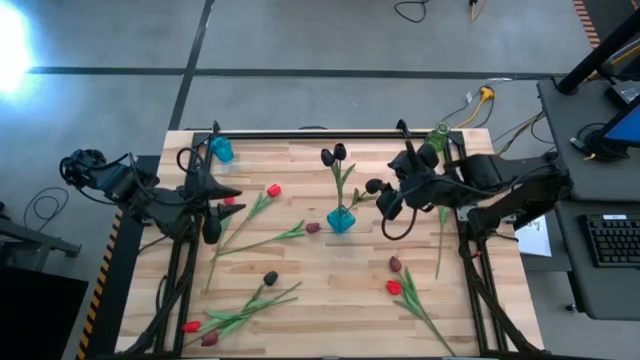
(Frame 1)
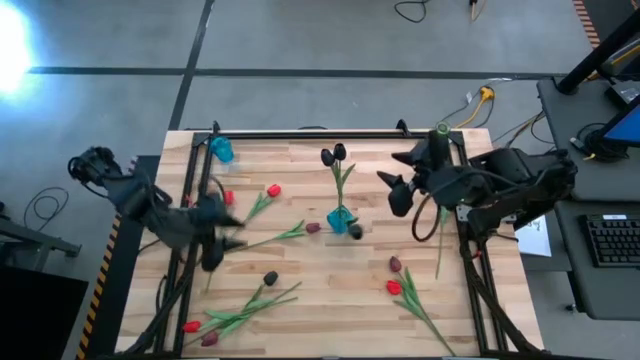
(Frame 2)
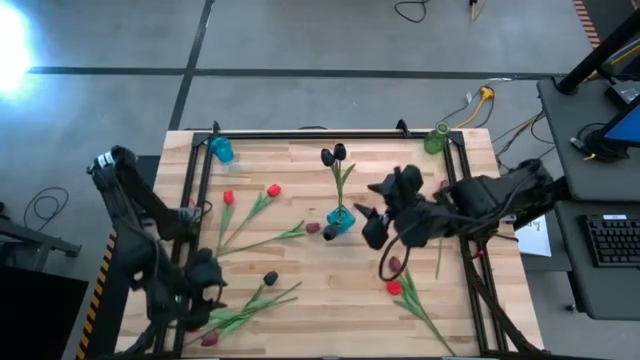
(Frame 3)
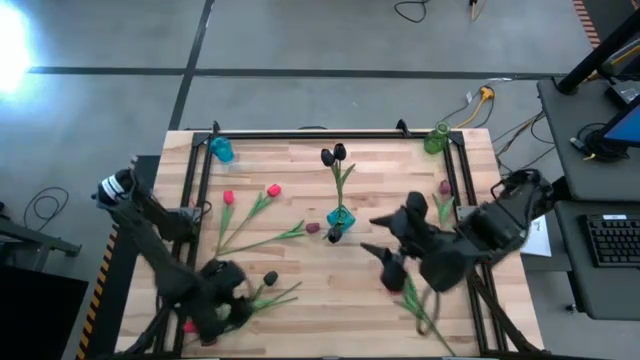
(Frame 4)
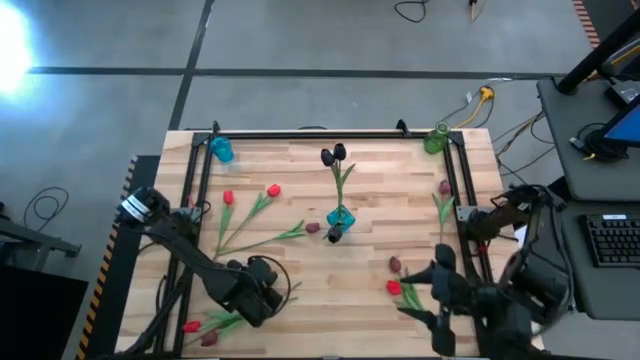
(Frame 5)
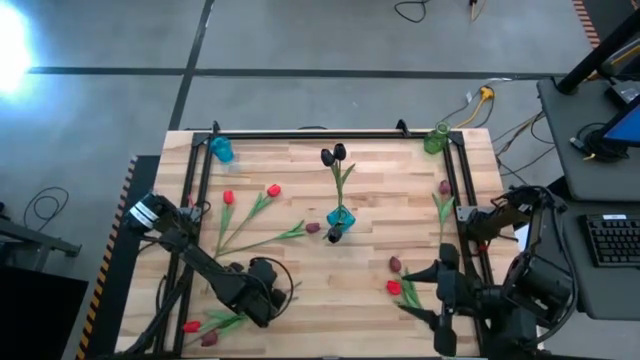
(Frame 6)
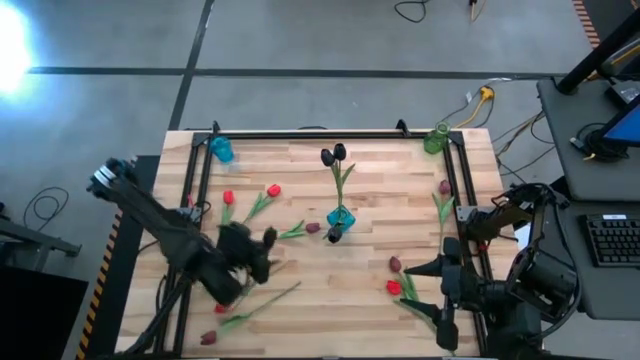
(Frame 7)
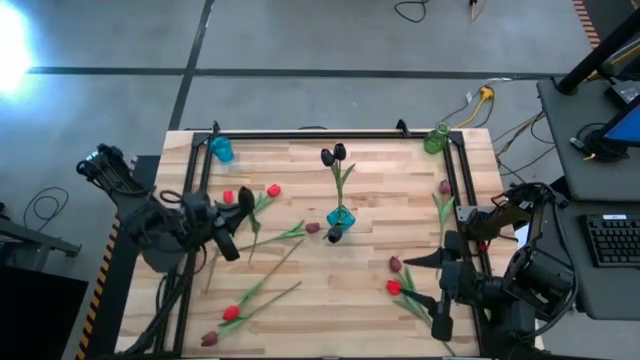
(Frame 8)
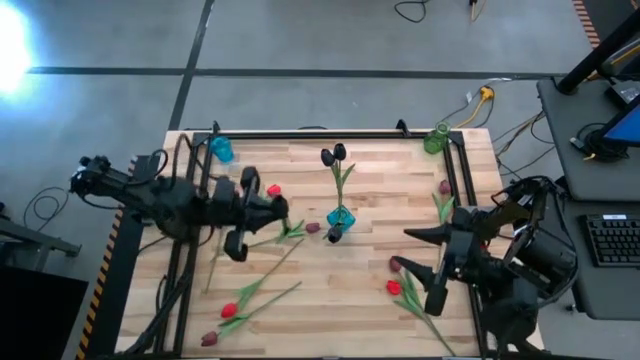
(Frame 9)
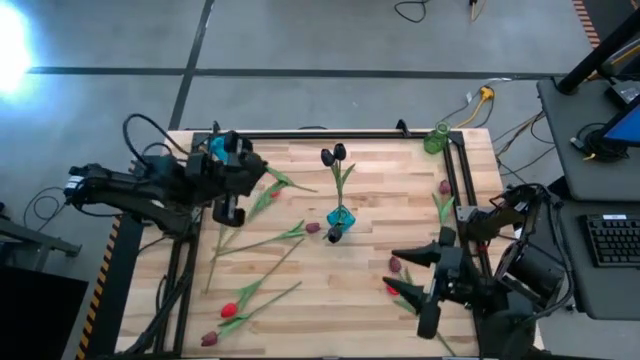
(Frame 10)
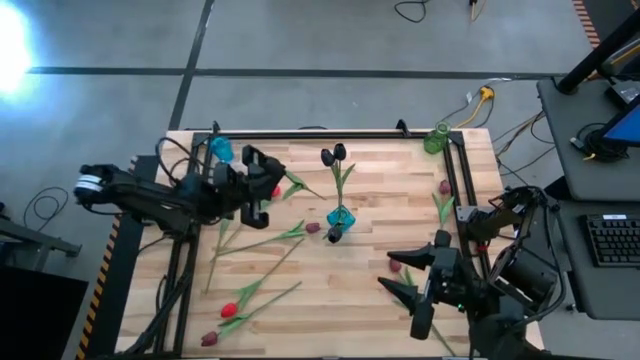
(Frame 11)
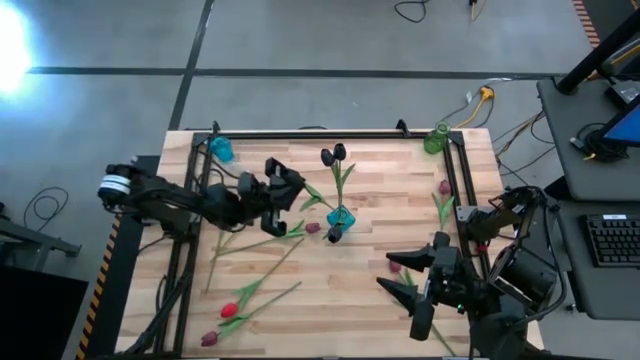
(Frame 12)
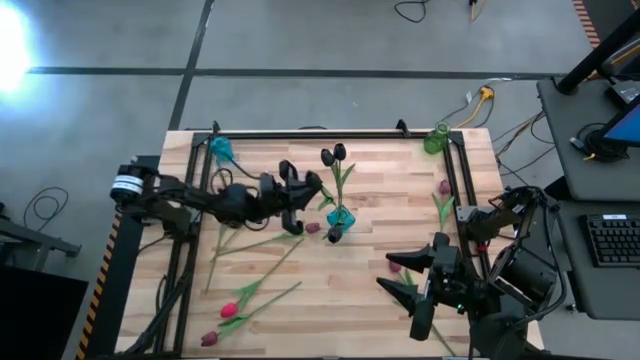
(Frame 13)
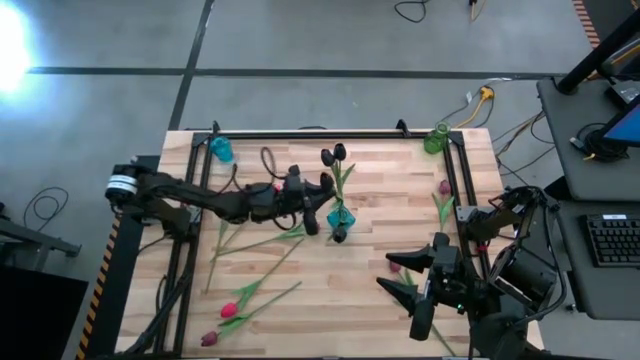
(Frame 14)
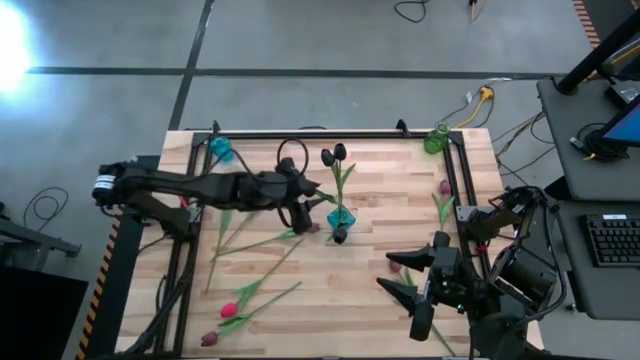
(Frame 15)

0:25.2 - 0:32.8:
Task: Sort flowers into vase by color
Put the black flower into the right blue vase

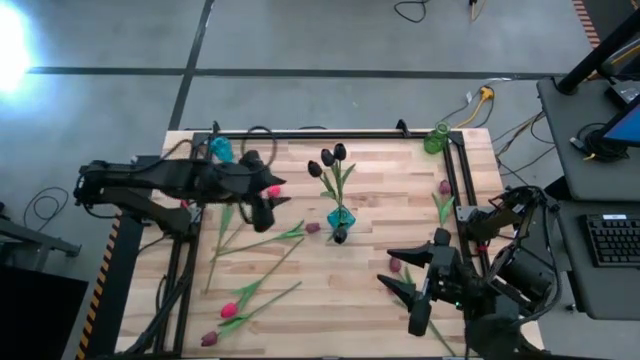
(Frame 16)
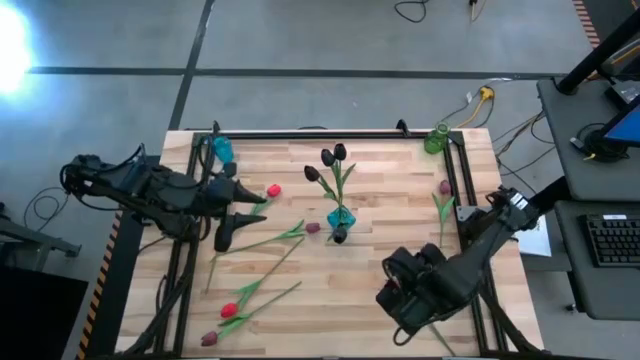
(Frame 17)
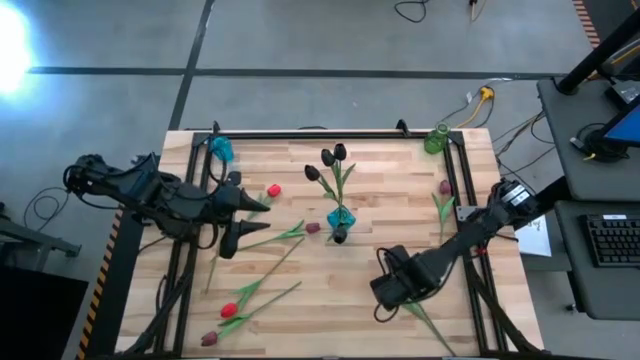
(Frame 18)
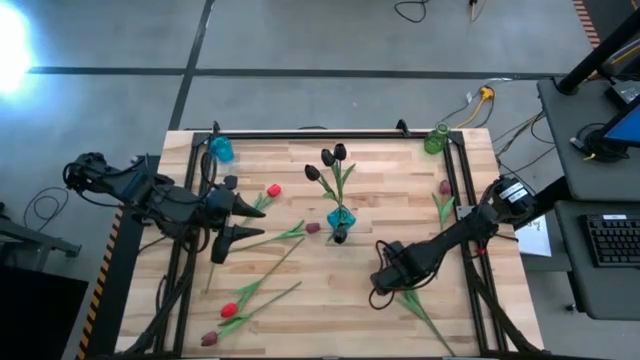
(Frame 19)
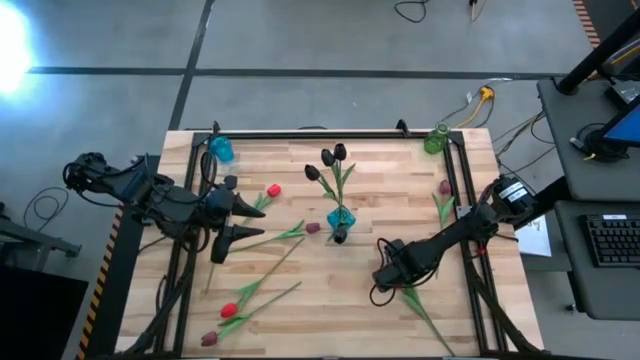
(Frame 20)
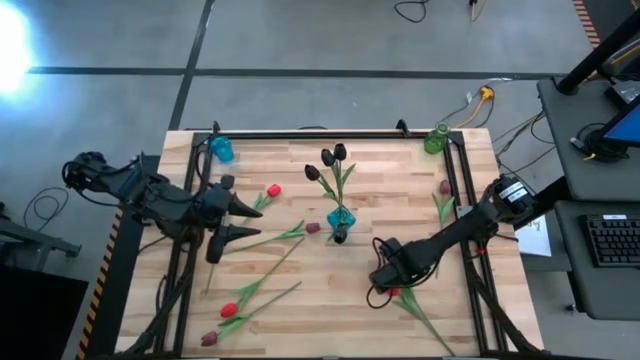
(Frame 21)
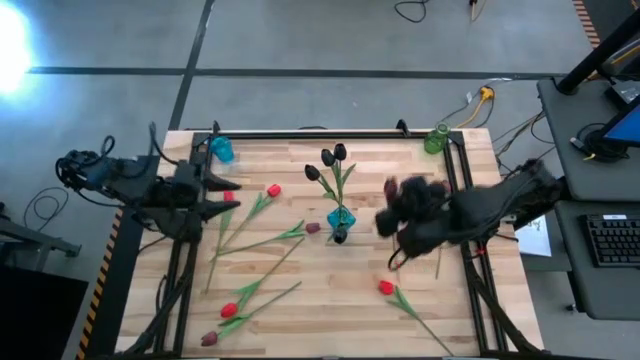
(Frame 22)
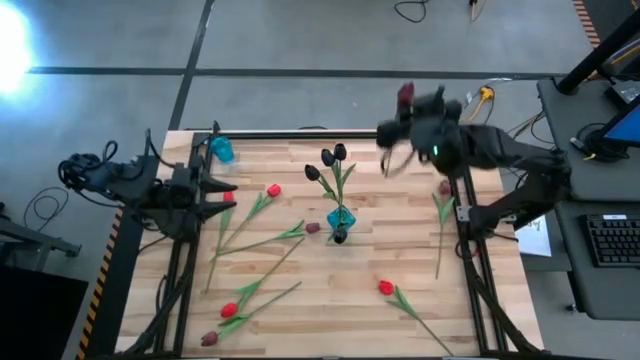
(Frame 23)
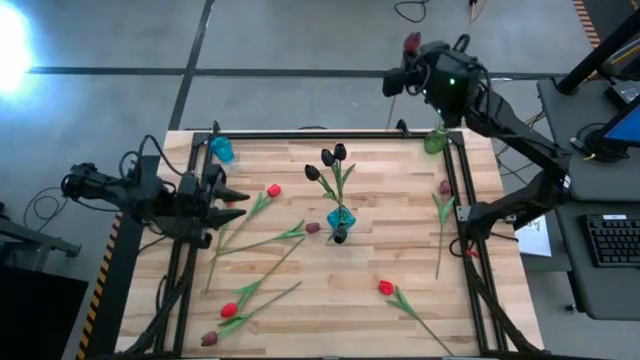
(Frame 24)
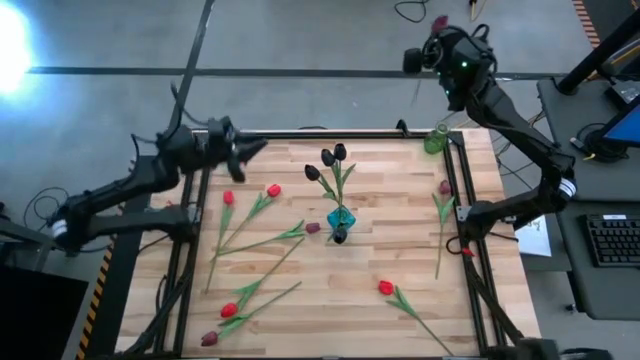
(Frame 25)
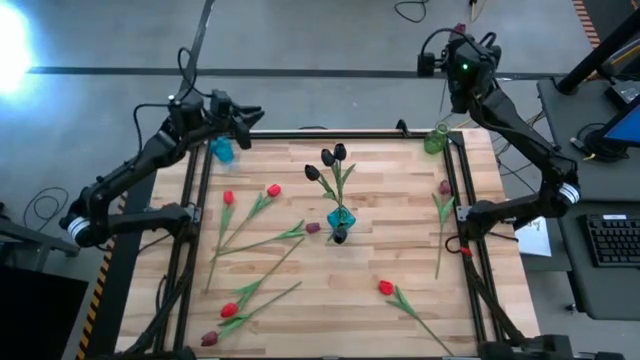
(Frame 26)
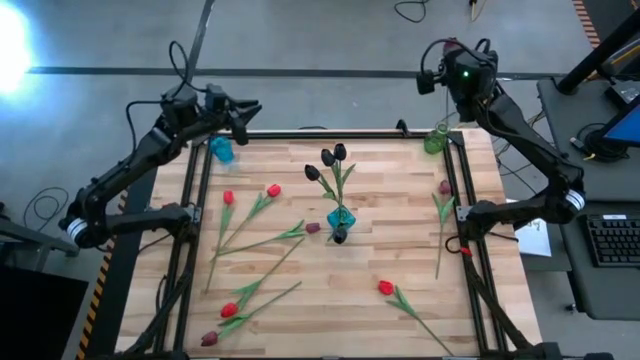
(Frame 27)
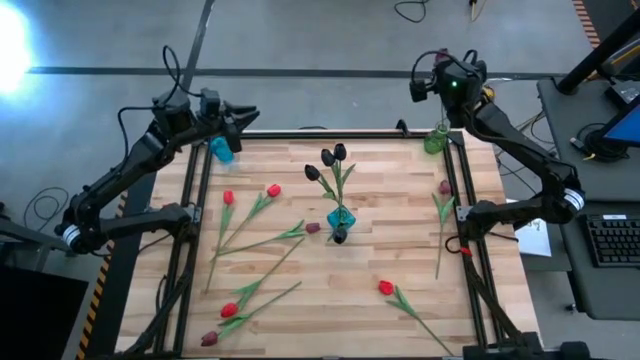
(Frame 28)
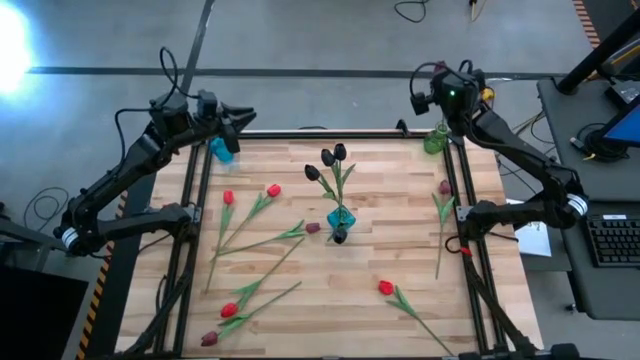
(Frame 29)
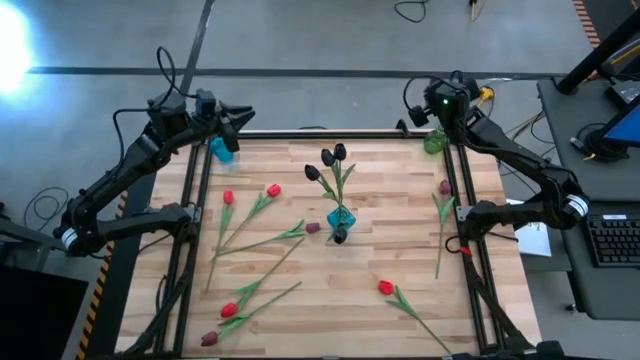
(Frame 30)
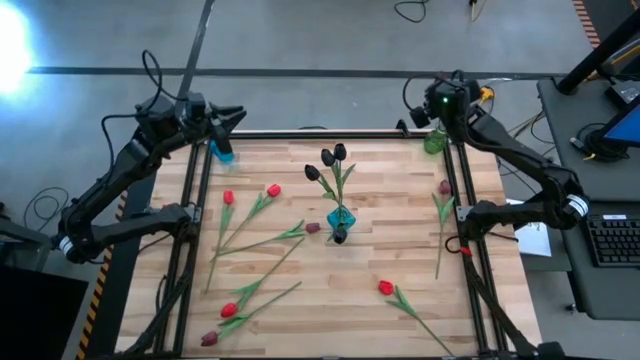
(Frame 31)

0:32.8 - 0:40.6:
Put the dark red flower into the green vase

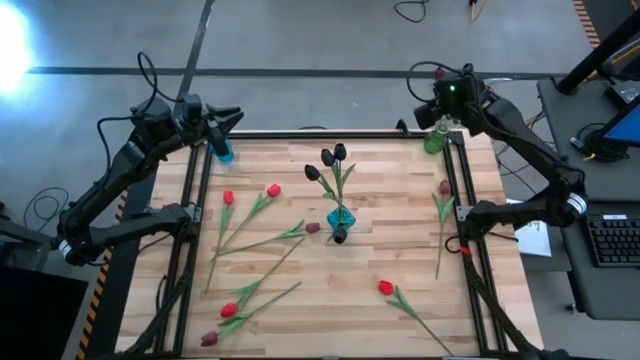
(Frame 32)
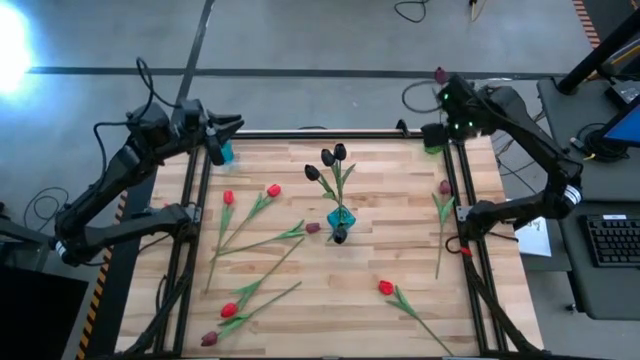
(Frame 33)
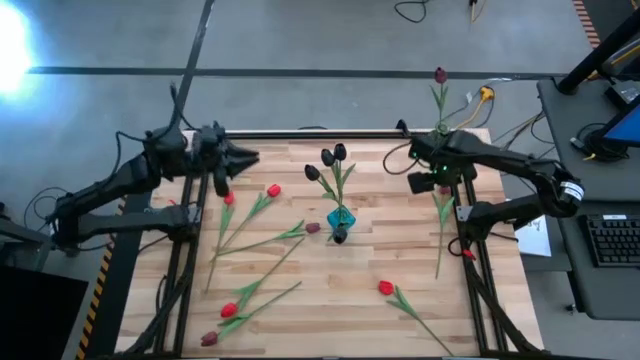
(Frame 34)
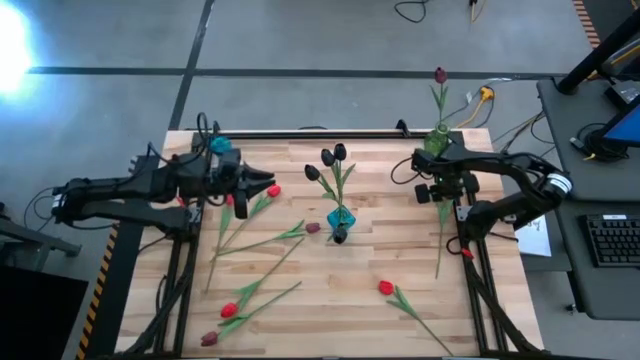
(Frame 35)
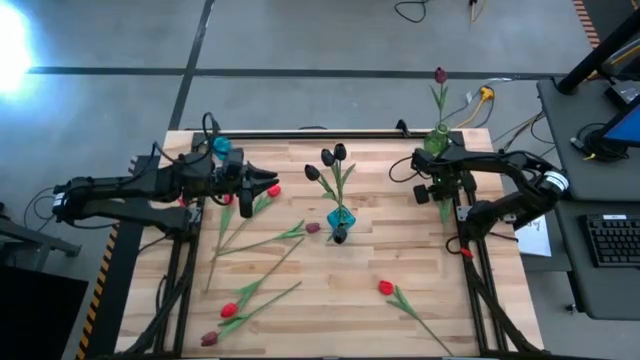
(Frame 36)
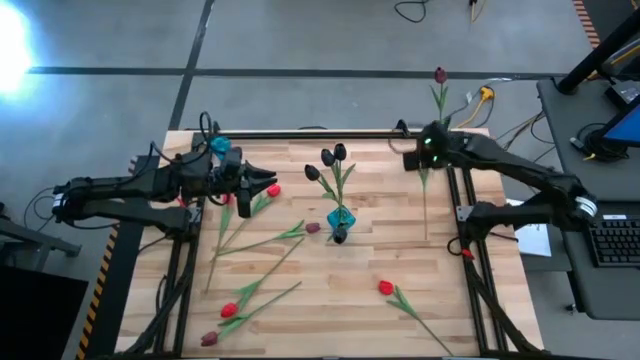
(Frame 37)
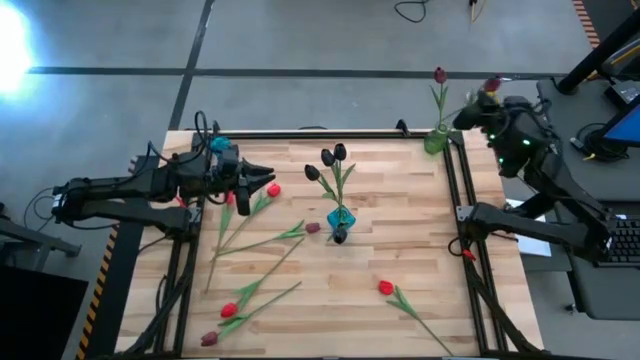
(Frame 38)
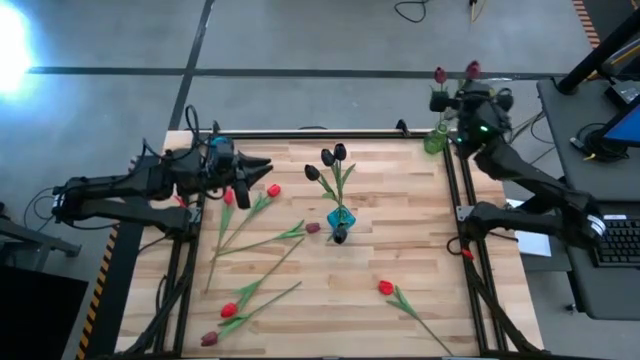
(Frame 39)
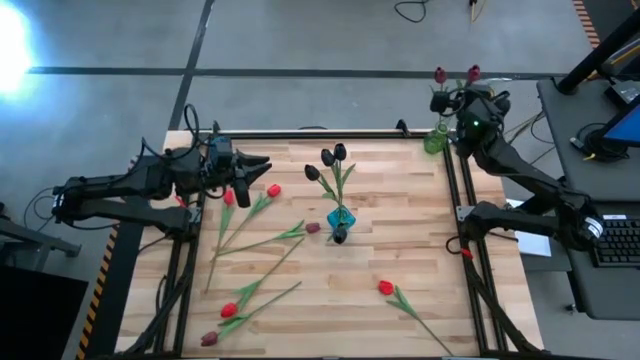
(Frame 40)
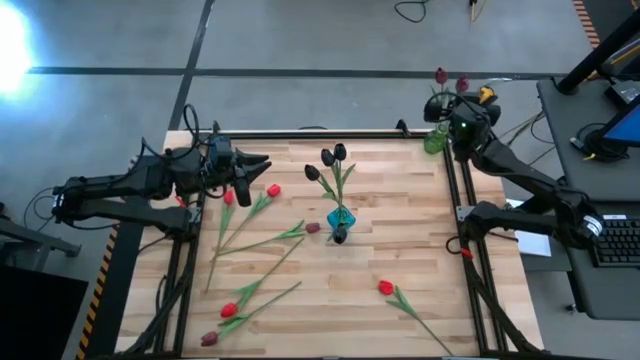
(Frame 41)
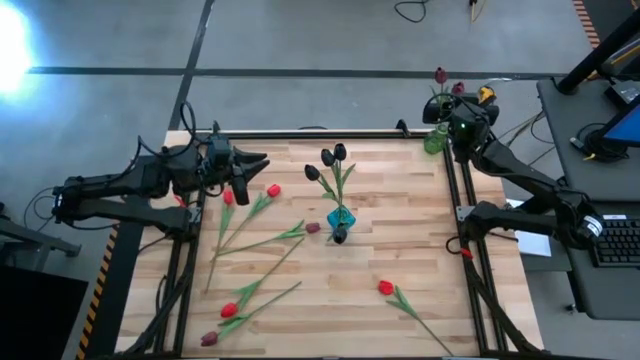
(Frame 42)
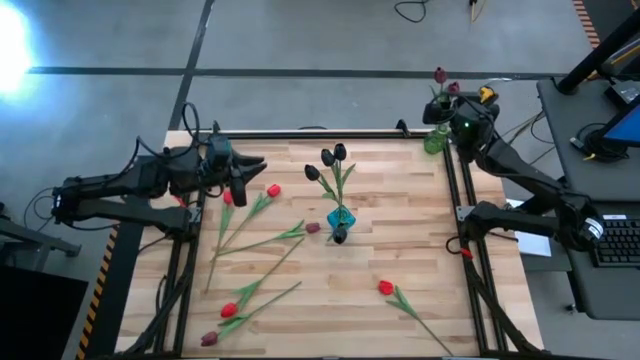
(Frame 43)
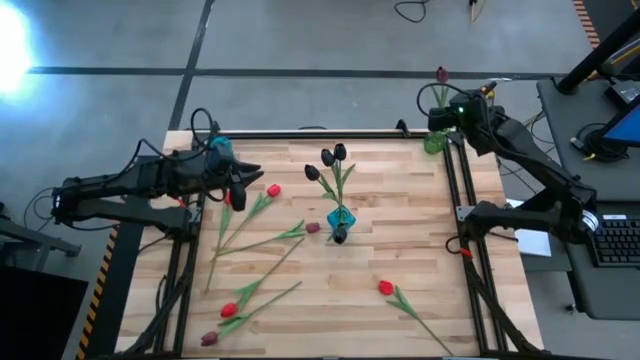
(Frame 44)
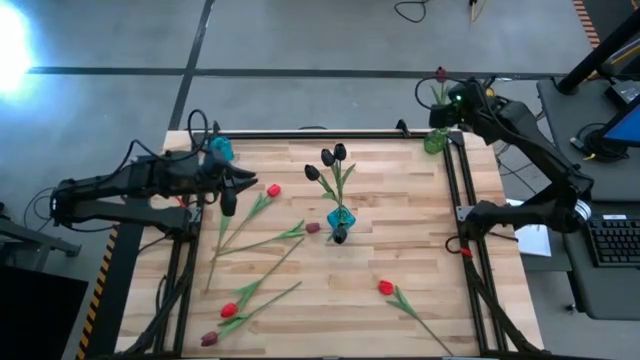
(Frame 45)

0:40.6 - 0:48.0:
Put the dark red flower into the green vase
